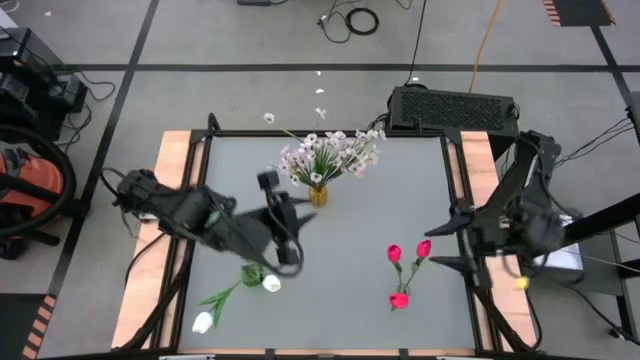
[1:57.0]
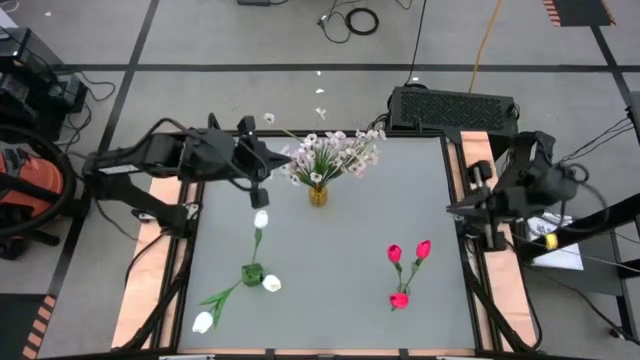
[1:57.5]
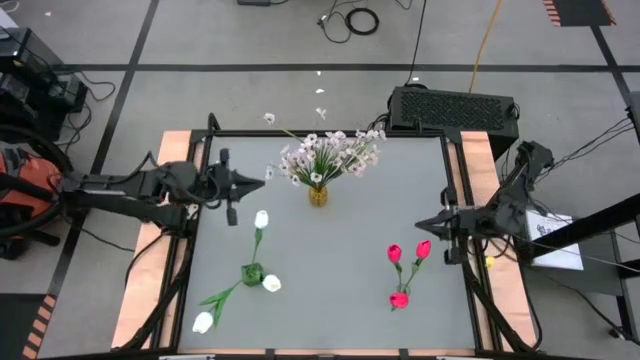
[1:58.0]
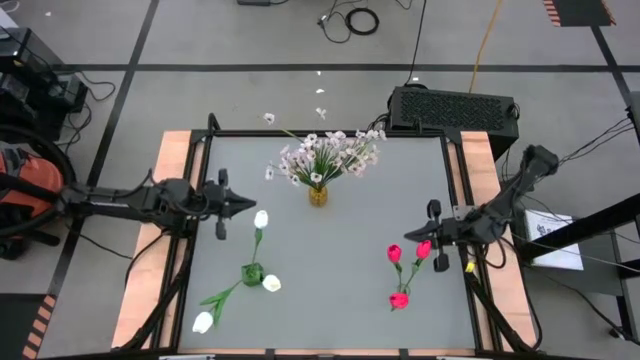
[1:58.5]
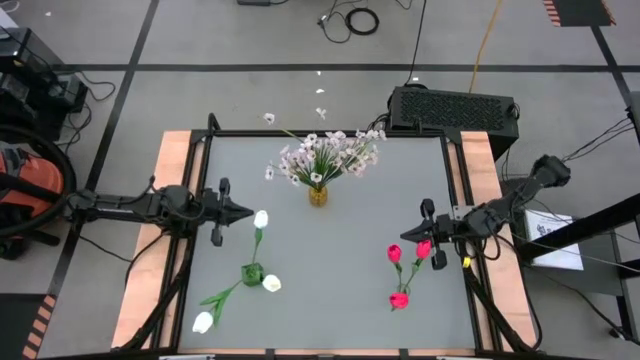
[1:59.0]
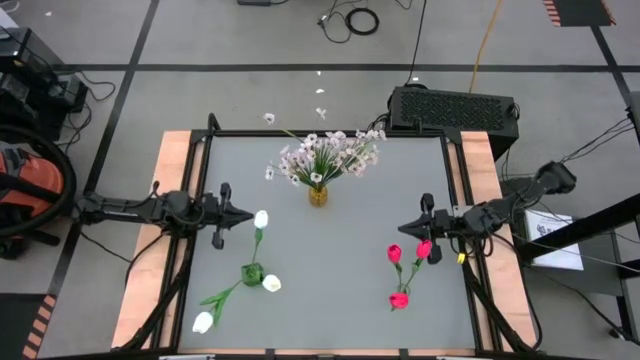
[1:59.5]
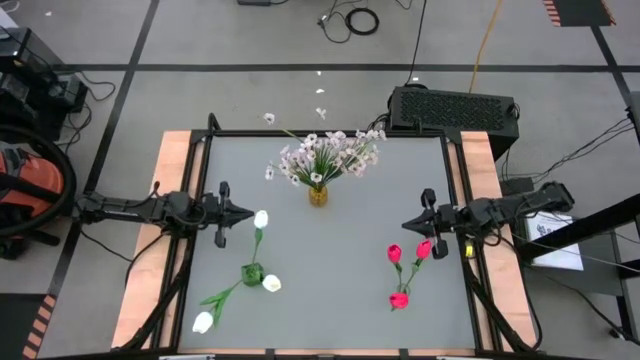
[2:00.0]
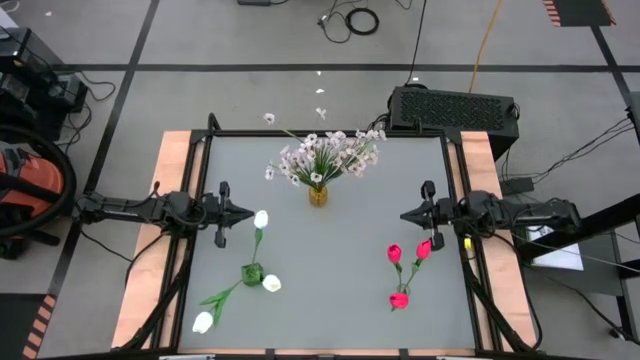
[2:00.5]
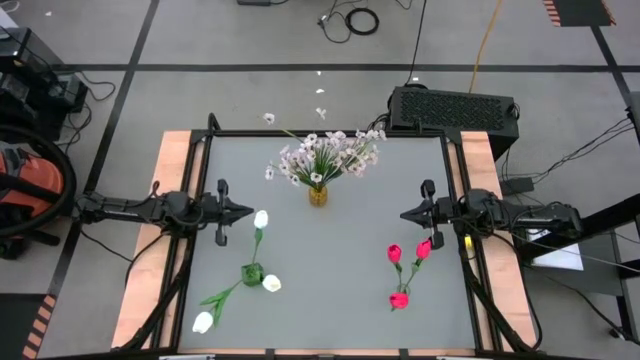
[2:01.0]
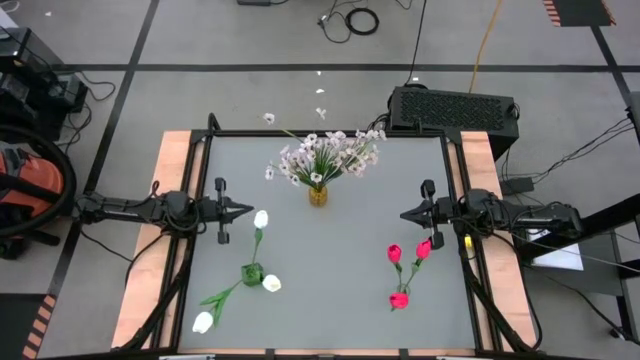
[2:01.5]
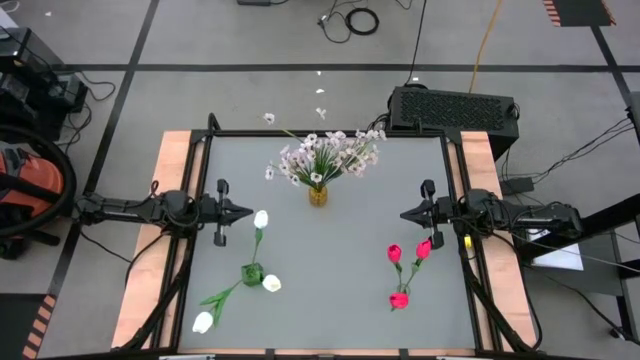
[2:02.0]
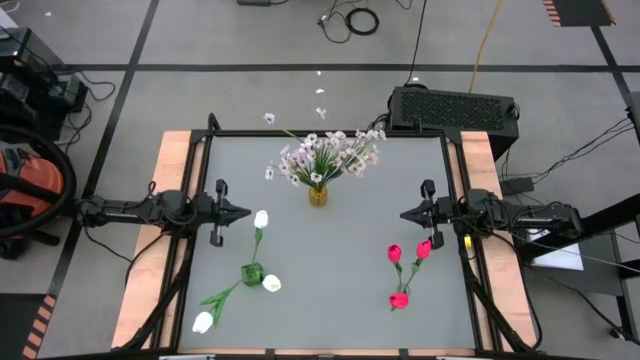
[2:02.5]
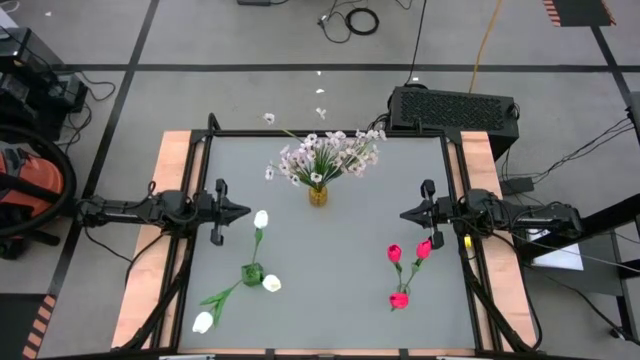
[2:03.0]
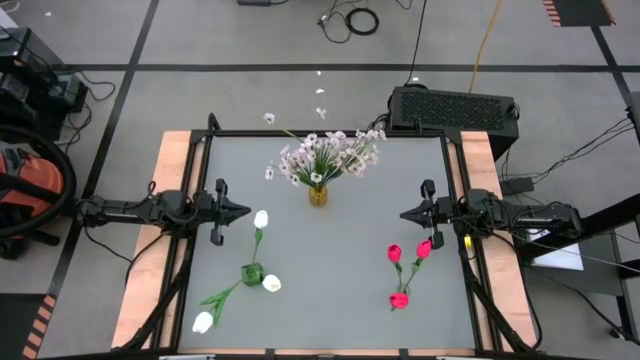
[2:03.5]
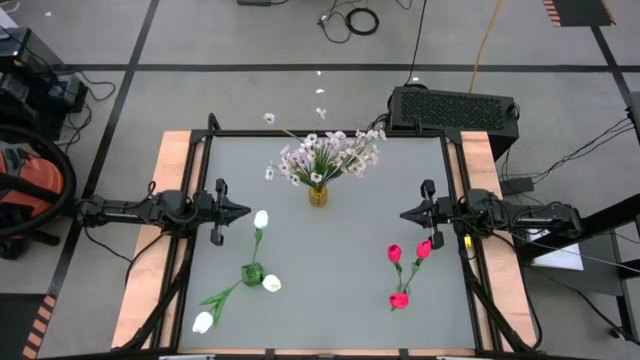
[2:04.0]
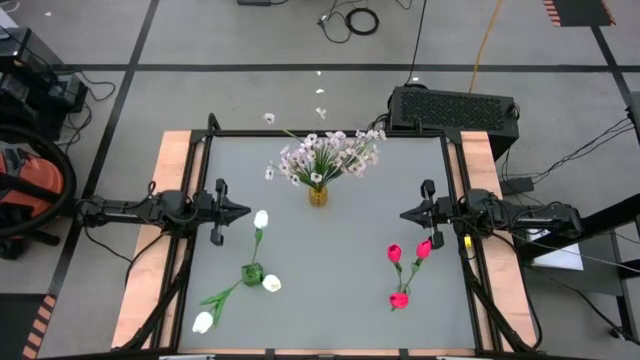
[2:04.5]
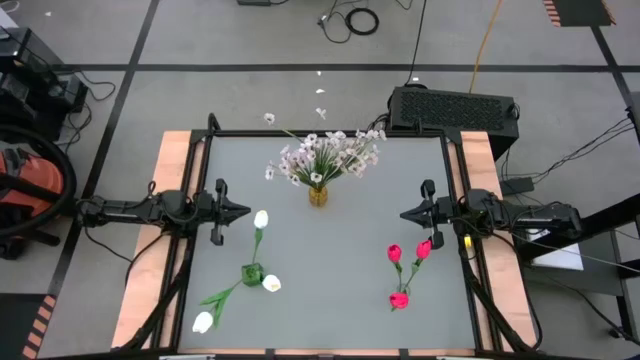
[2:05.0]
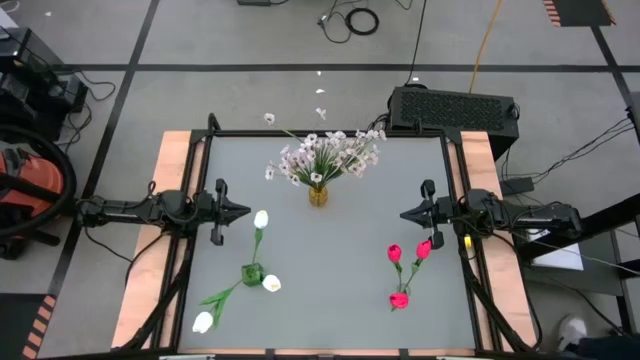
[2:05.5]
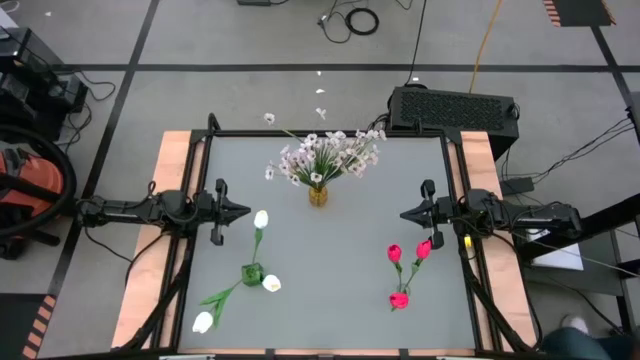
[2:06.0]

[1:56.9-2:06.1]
Task: Sort flowers into vase by color
Return to Home Position

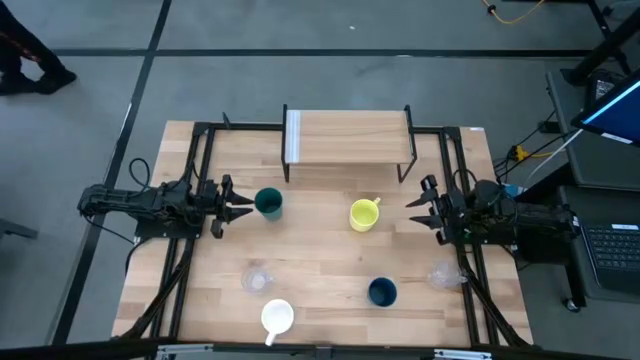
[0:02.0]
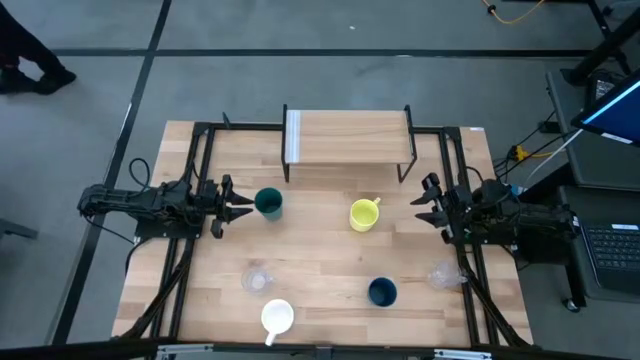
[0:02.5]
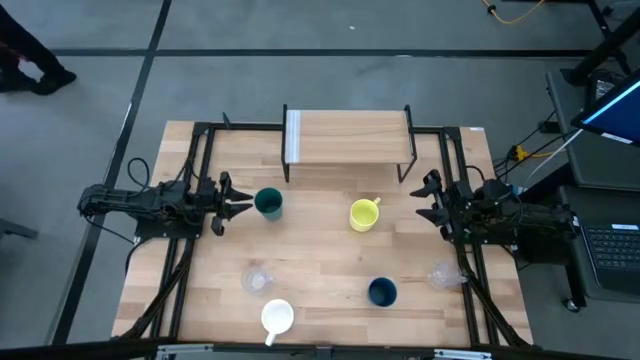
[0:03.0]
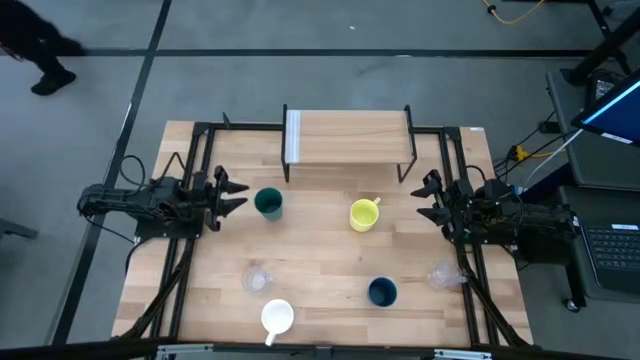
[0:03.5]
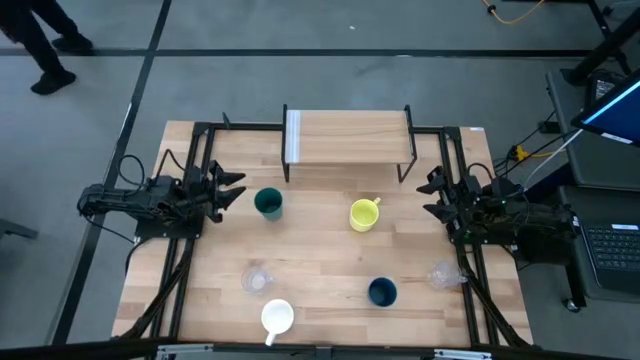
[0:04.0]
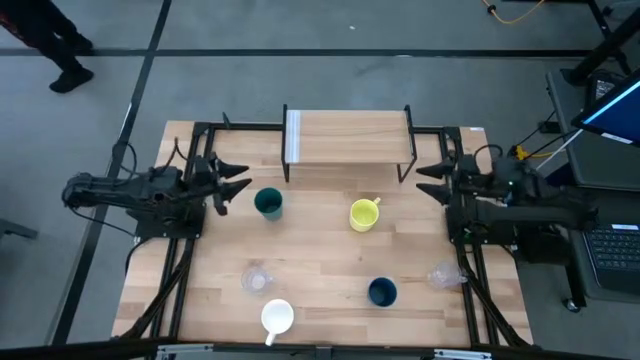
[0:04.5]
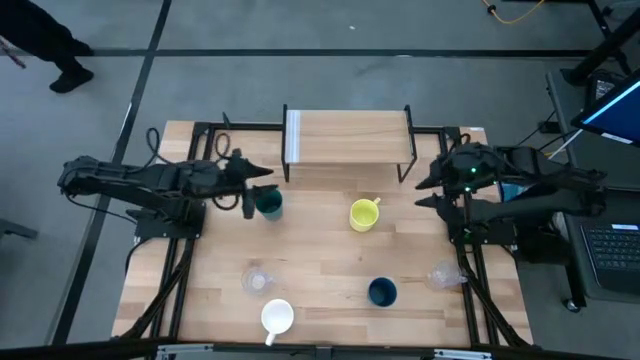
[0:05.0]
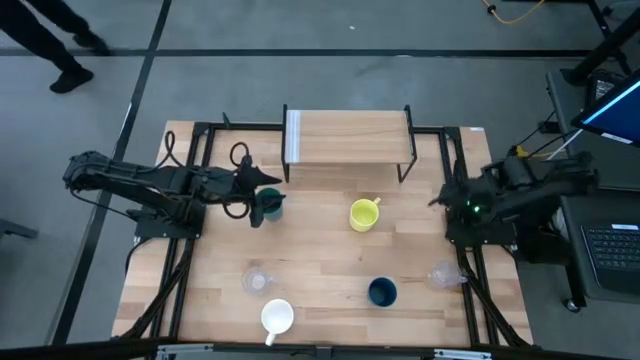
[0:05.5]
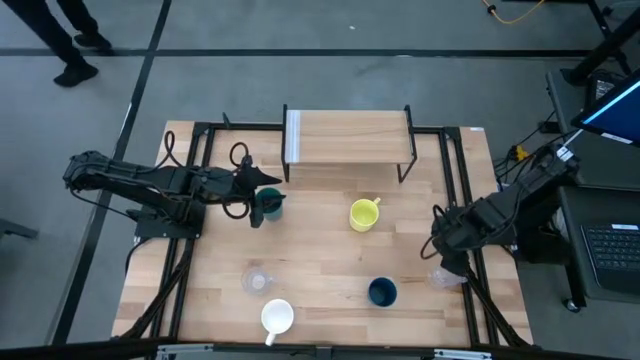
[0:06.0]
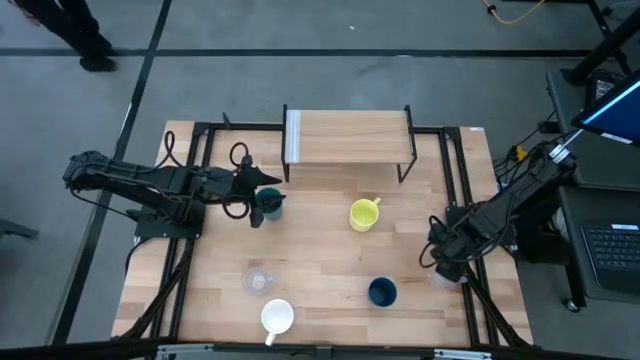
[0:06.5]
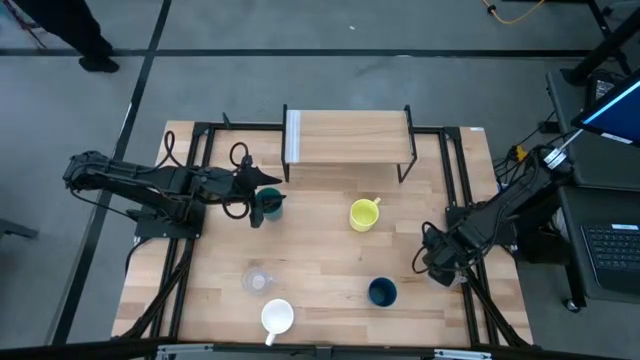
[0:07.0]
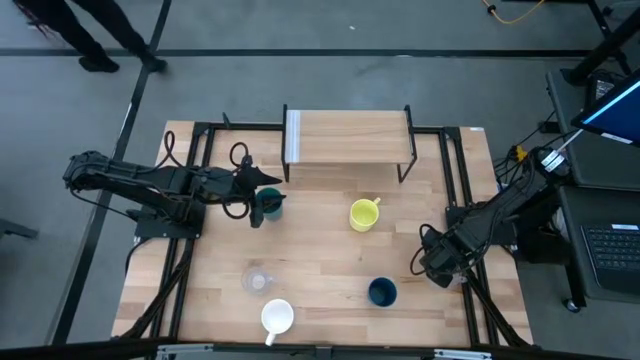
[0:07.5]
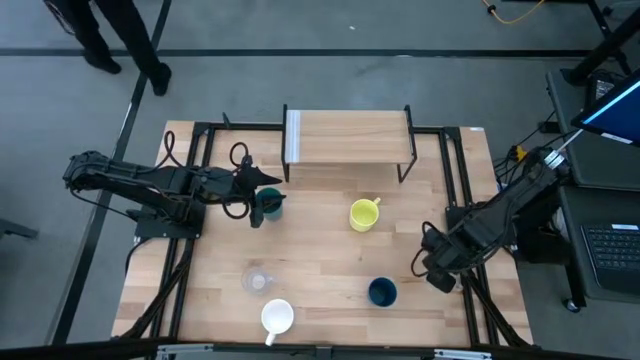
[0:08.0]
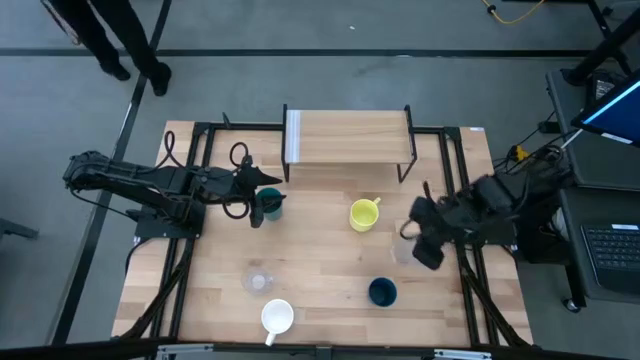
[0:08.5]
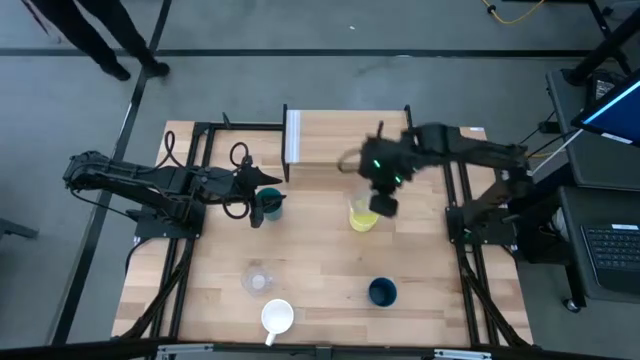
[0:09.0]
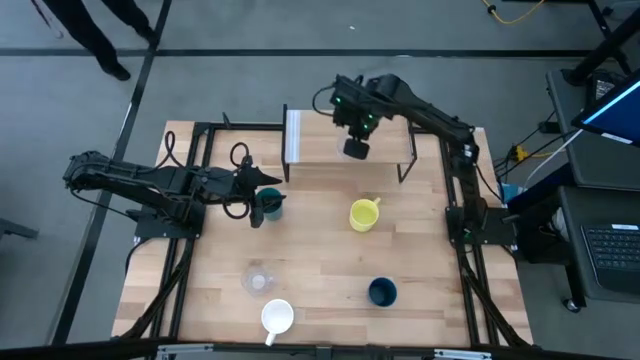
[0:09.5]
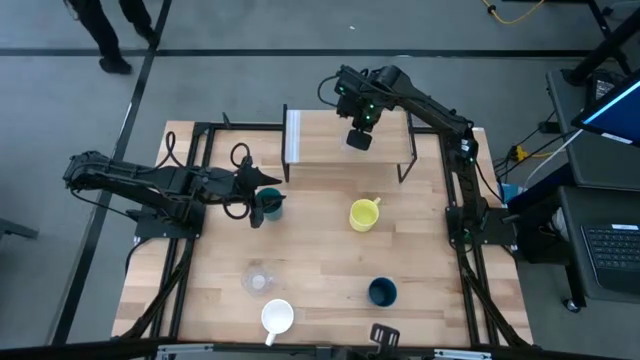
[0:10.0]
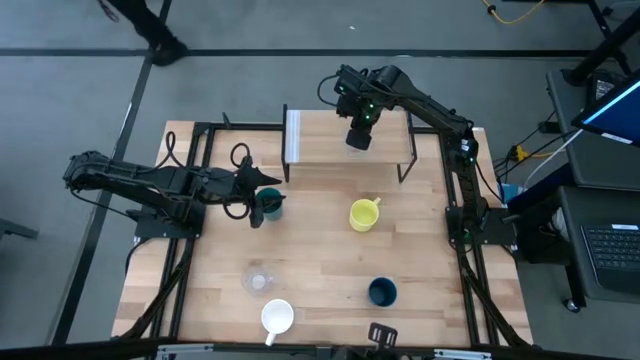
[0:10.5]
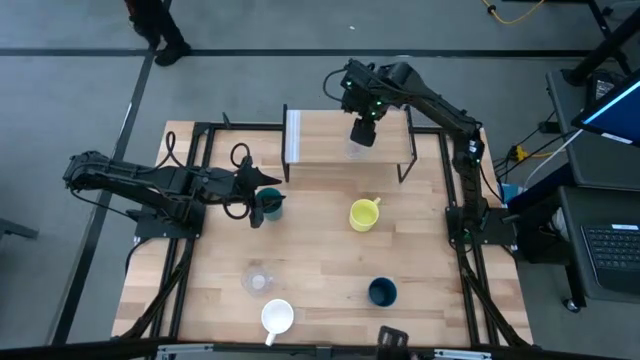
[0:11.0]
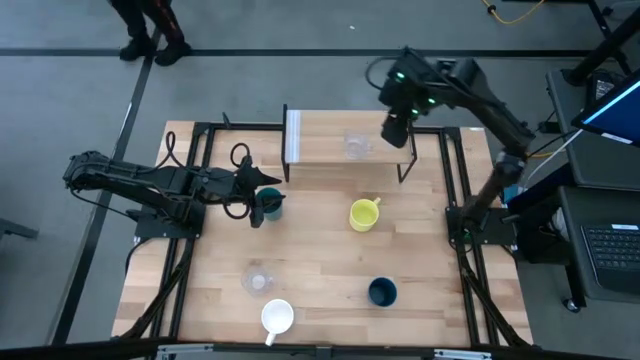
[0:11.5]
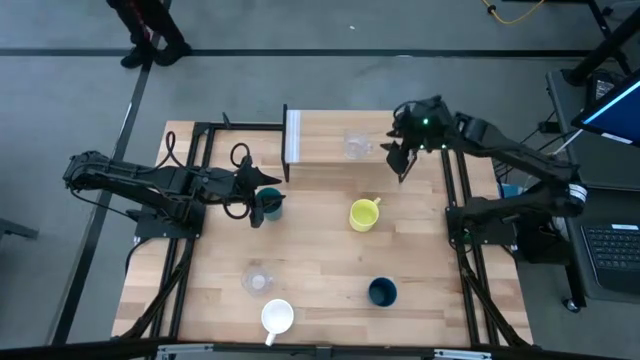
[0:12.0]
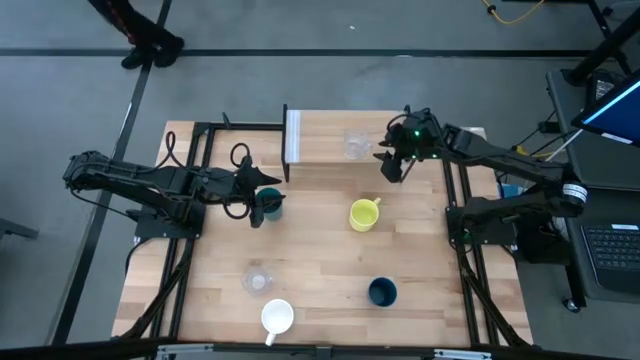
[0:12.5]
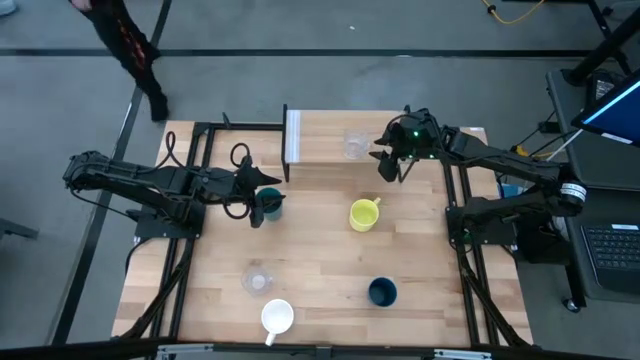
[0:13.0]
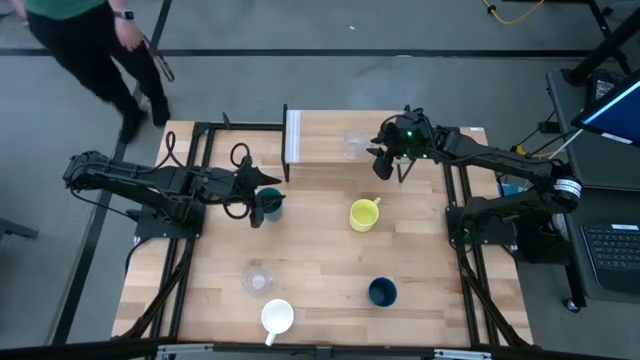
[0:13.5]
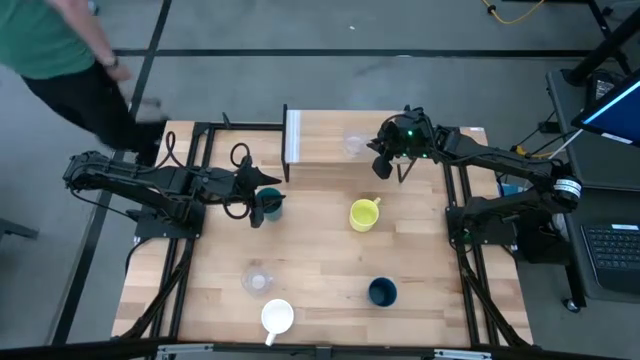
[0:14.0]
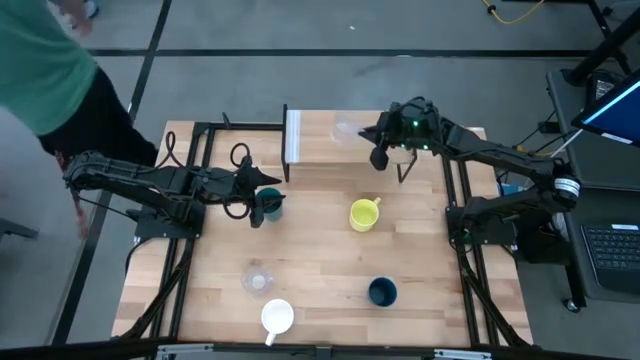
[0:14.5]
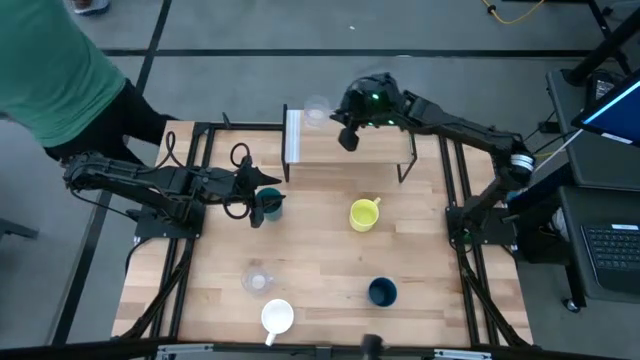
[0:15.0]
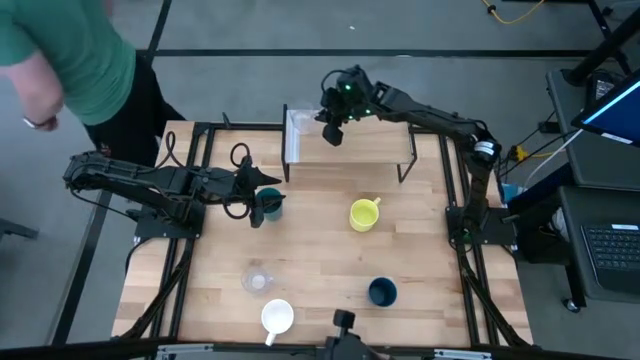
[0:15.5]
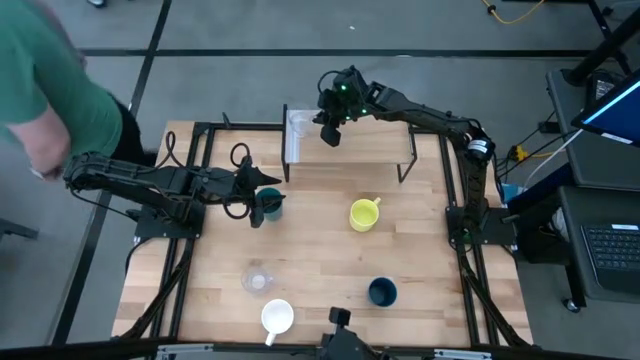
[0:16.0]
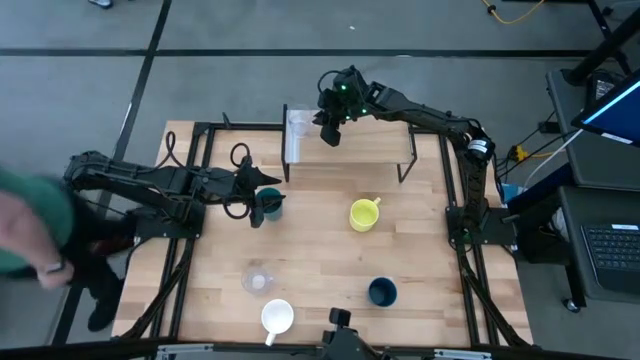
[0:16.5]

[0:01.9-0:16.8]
Task: Stack small to large cups/mugs on shelf
Put the right transparent mug on the shelf
